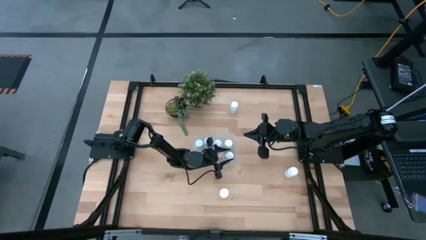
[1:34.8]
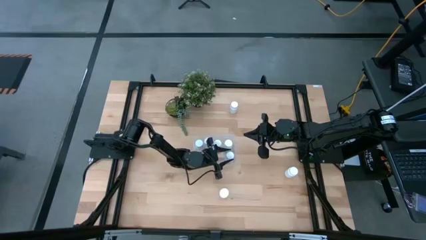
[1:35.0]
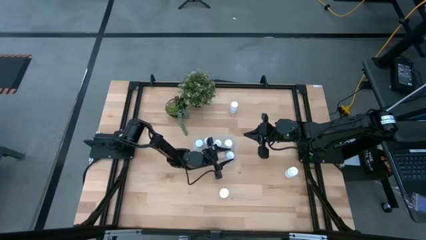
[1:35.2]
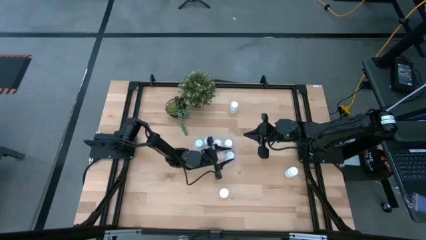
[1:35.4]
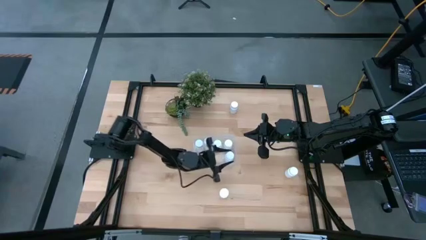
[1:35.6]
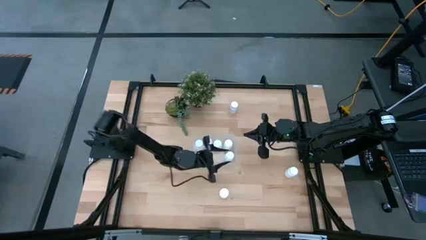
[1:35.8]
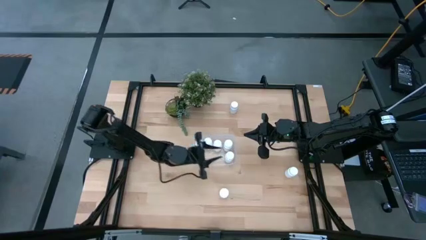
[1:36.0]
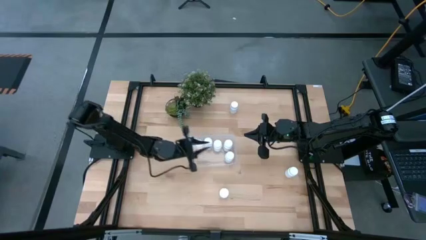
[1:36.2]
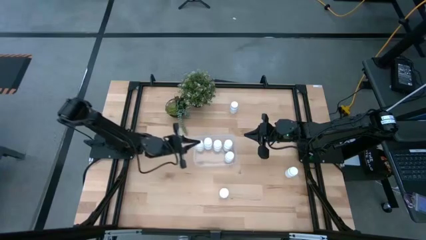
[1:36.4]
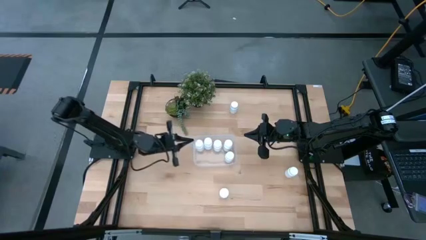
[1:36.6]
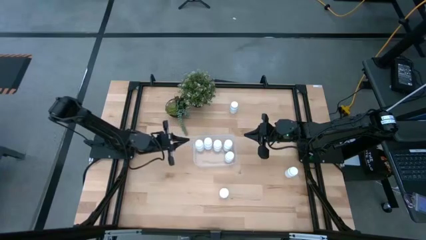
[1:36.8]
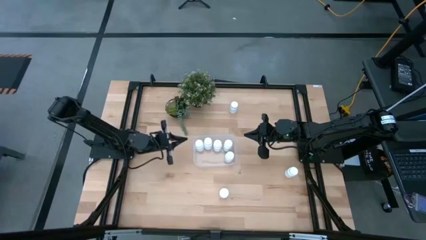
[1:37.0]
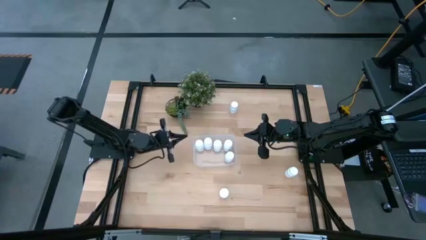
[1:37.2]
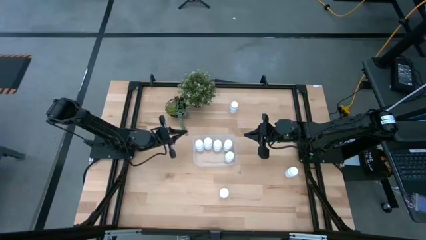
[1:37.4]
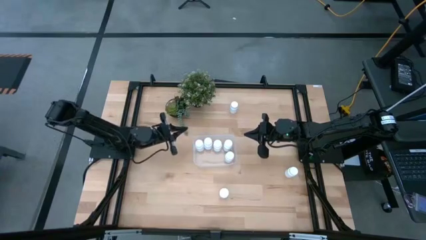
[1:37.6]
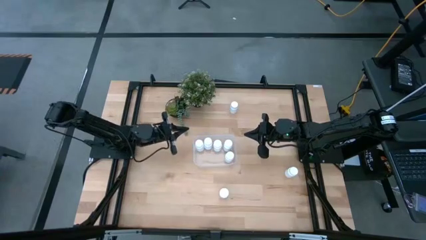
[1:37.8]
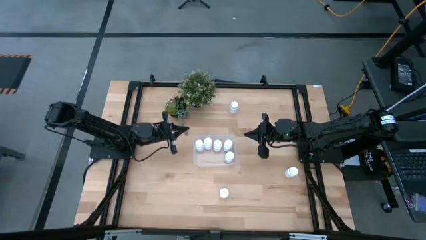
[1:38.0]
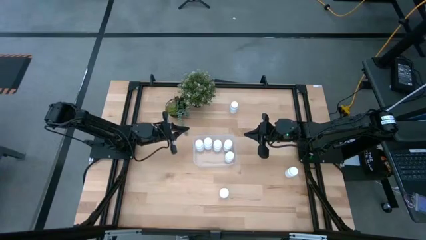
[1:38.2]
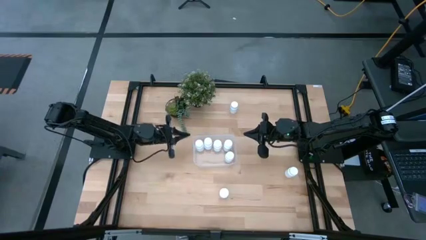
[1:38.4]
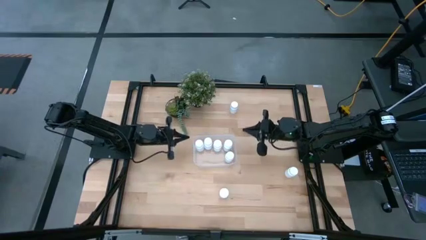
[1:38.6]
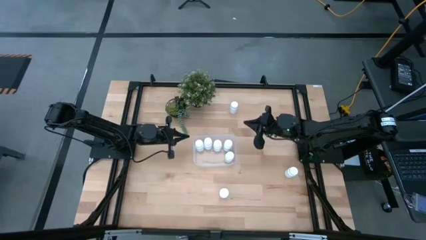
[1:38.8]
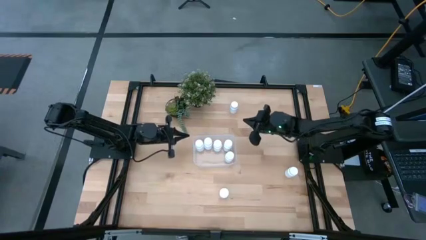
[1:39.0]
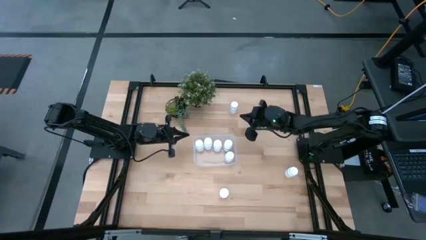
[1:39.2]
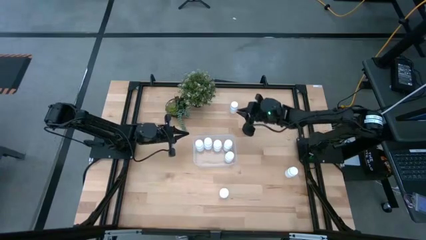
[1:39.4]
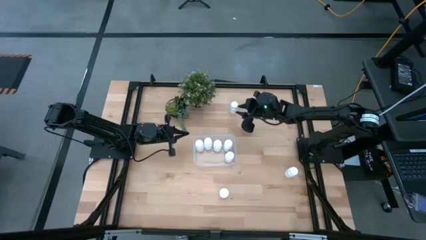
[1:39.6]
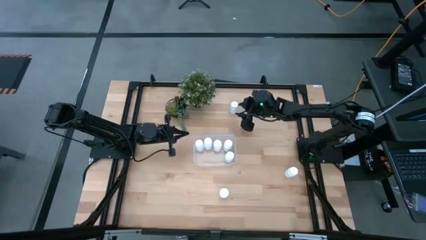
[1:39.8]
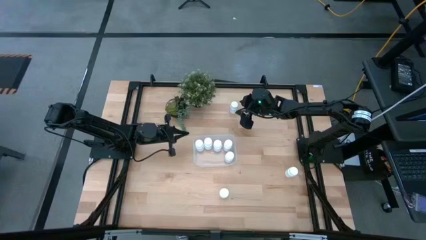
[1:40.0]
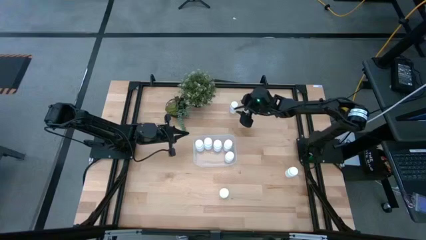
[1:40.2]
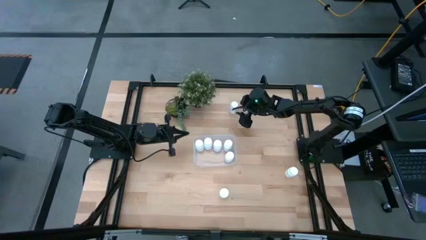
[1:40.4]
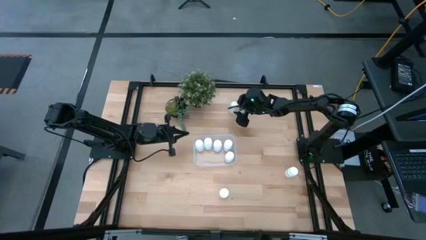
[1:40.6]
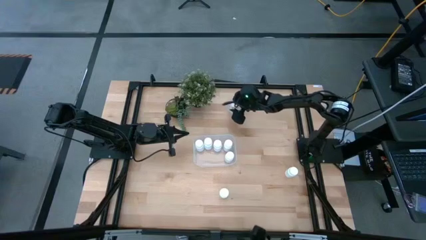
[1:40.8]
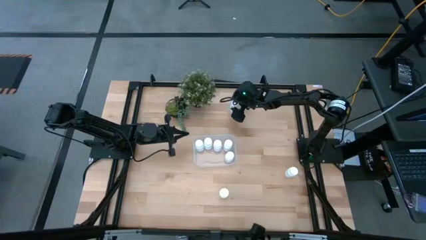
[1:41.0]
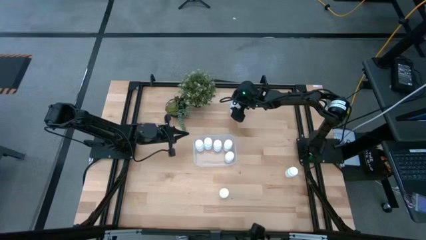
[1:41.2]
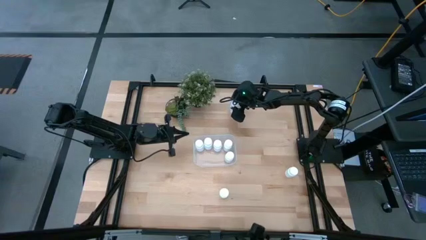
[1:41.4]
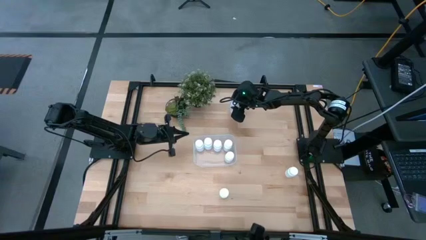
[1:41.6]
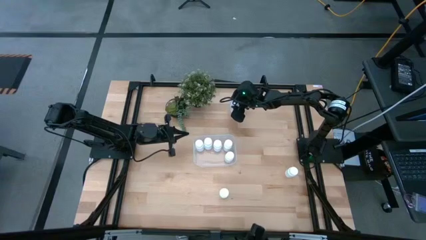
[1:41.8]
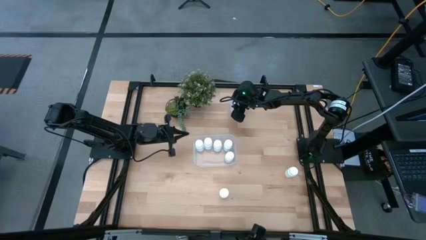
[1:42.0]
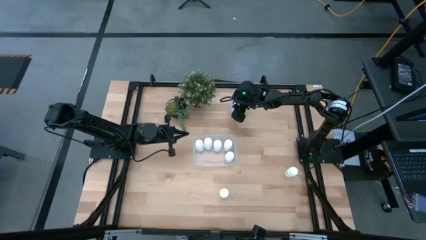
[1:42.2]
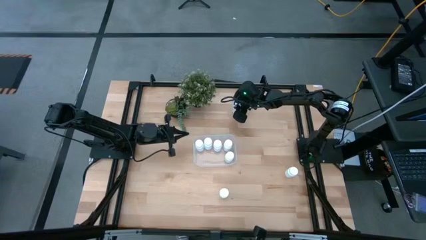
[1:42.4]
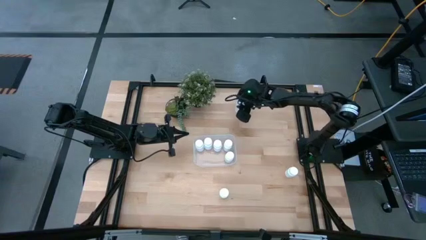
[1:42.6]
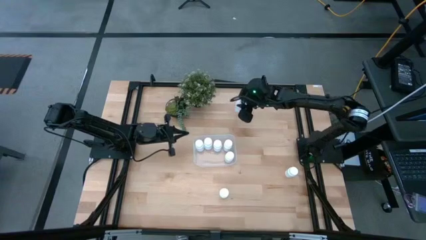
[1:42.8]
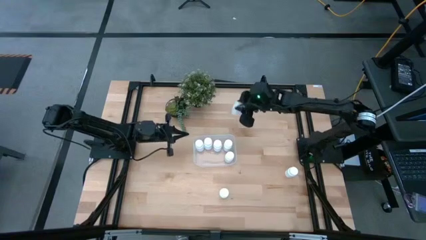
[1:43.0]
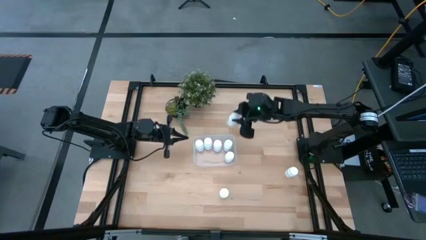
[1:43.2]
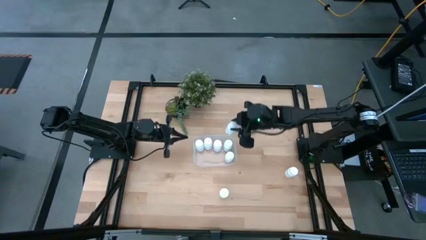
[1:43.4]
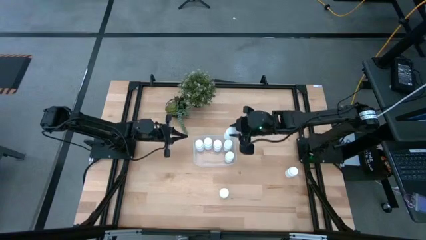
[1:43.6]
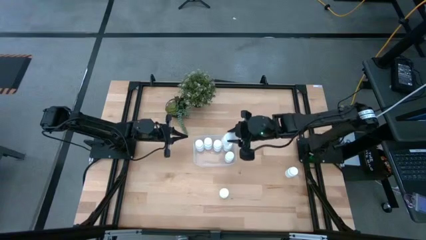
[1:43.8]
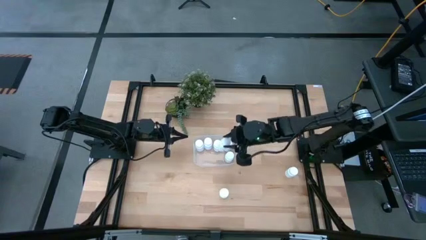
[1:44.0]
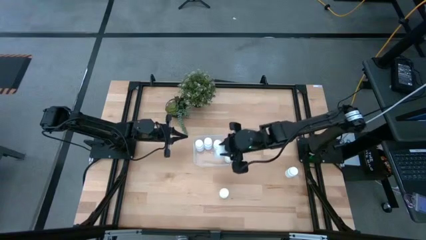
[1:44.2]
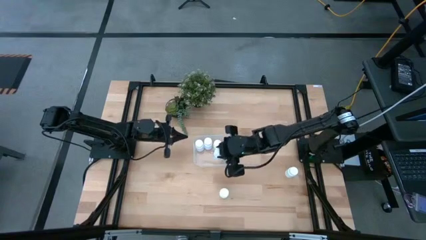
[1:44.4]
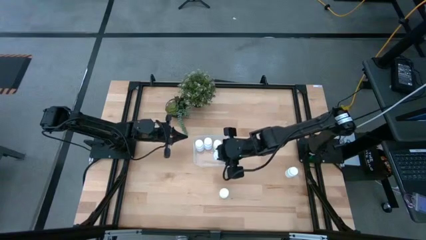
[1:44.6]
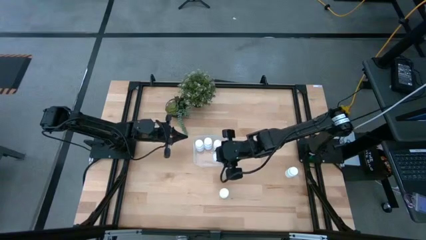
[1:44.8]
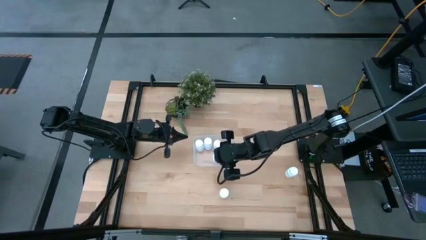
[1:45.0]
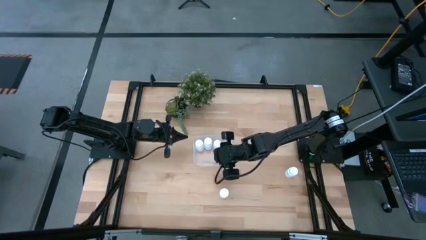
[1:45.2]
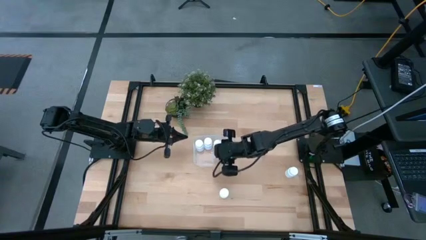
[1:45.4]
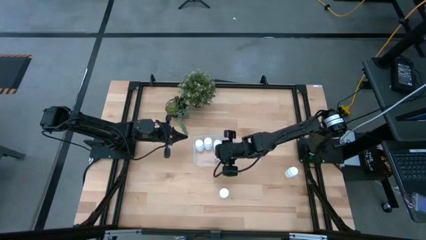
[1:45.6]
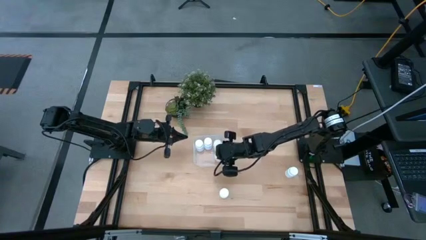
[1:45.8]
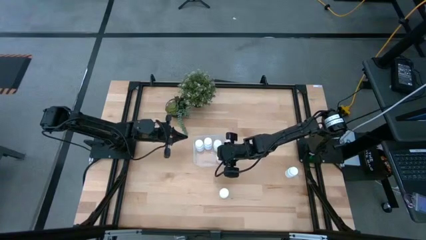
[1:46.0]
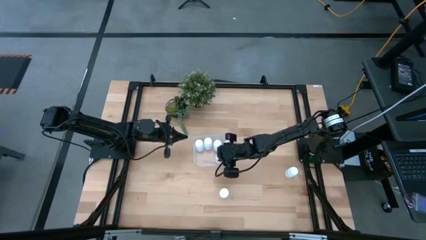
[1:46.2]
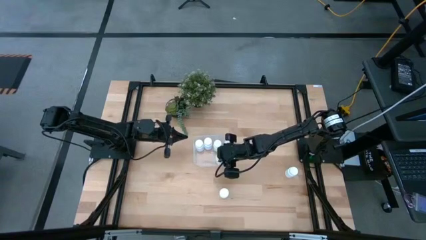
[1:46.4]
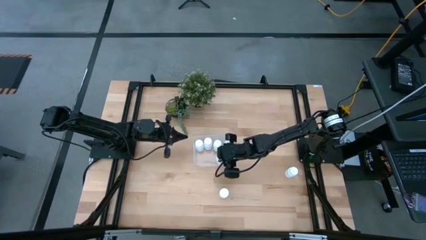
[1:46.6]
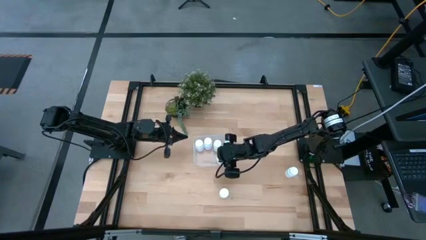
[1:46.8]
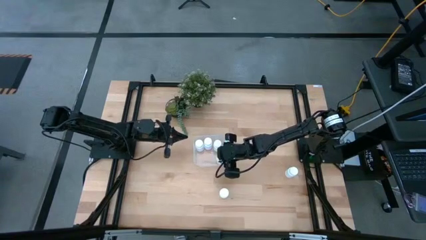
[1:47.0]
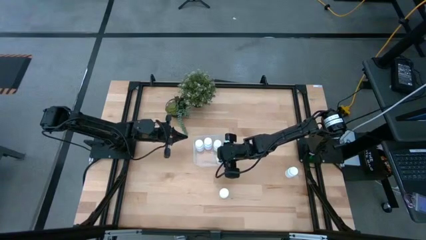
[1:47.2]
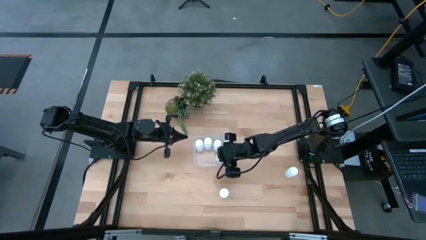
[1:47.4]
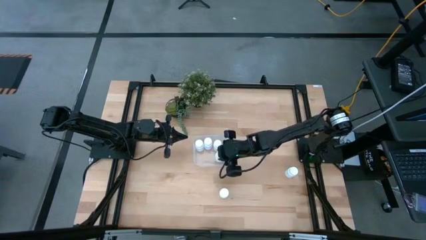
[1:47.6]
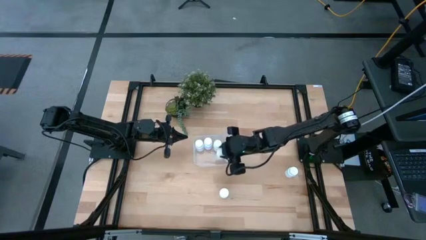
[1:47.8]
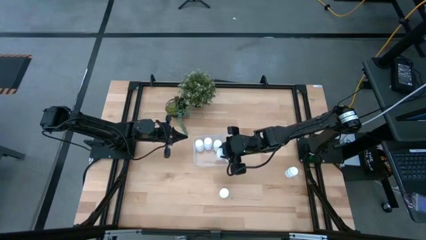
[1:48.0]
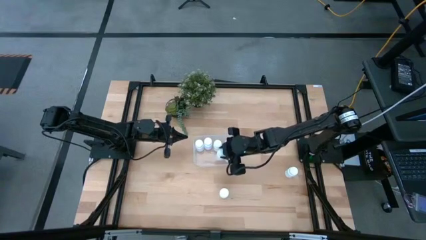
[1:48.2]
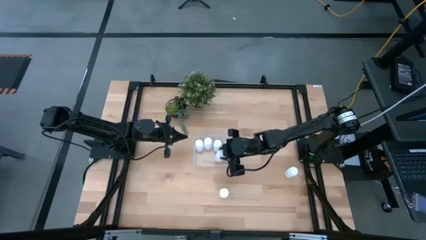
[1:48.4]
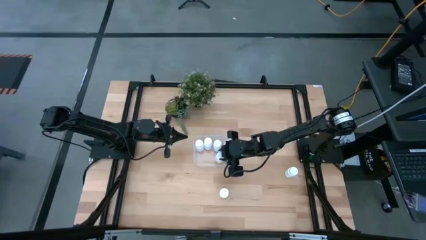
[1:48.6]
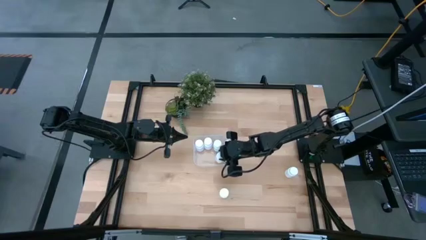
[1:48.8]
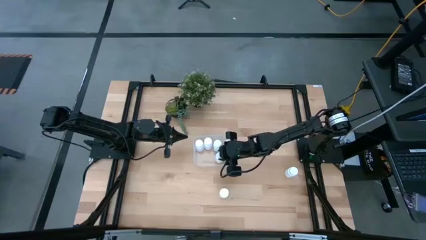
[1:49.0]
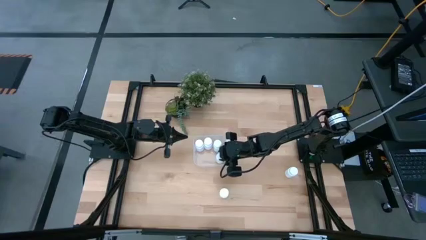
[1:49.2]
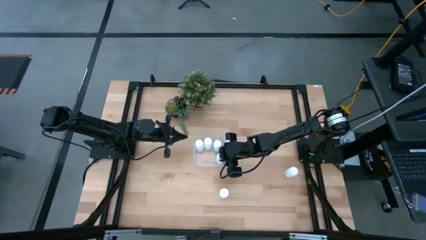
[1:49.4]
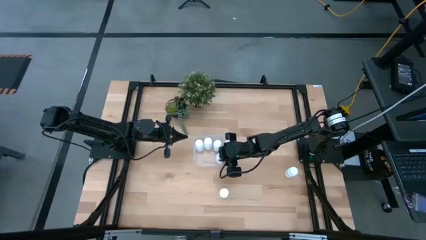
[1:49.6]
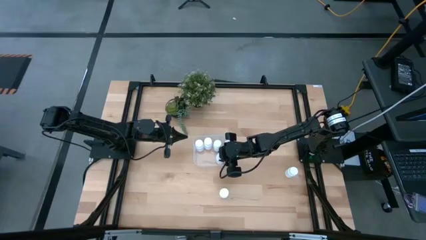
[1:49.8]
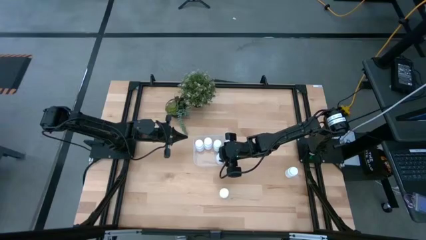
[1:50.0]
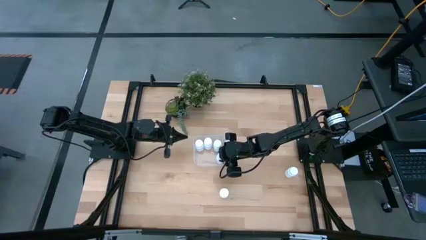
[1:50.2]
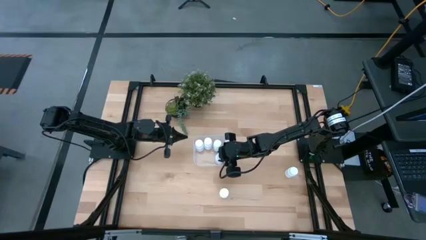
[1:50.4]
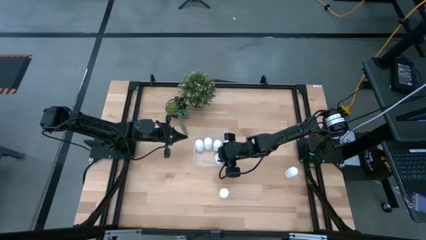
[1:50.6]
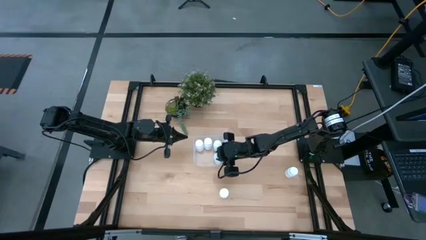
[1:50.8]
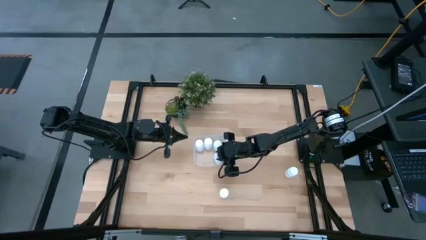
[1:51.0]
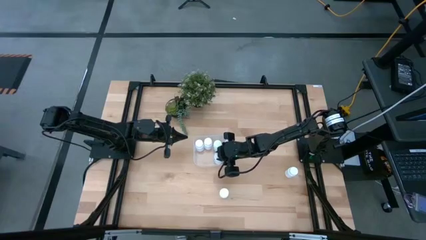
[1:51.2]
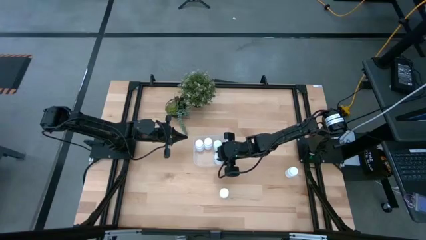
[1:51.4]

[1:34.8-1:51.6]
Task: Pick and place pill bottles into a basket
Put the top pill bottle into the bin
